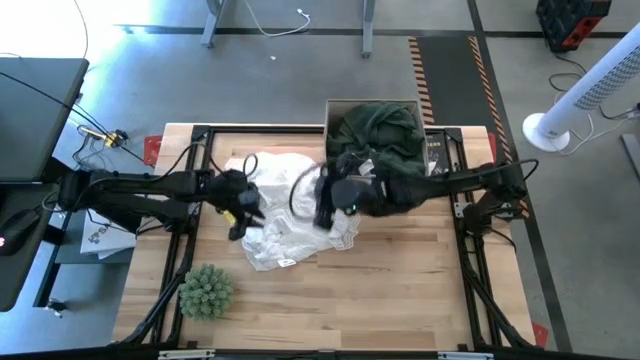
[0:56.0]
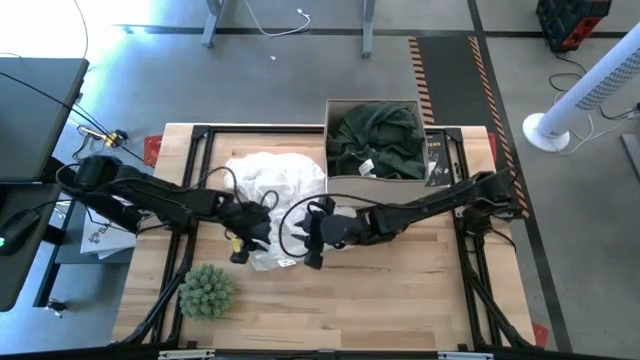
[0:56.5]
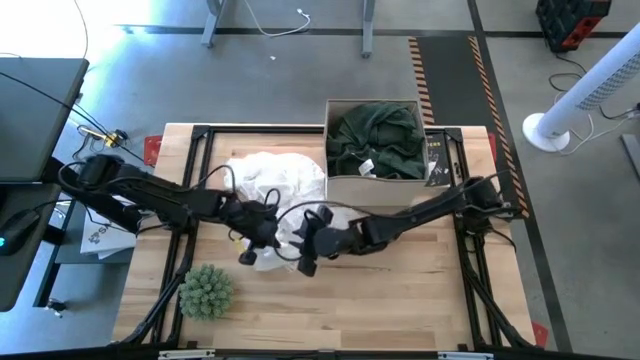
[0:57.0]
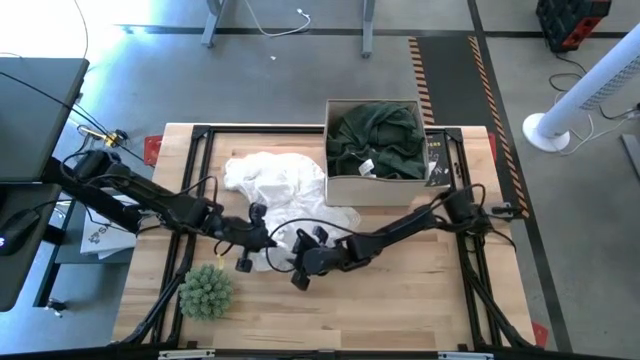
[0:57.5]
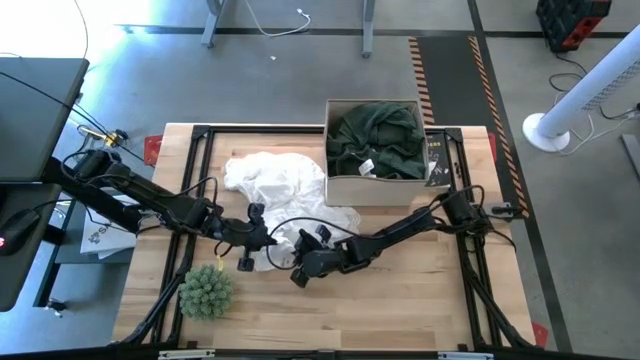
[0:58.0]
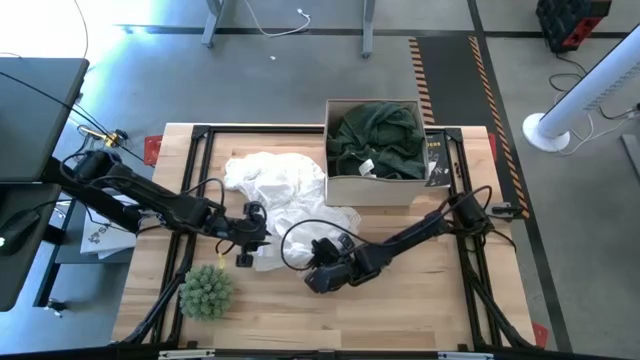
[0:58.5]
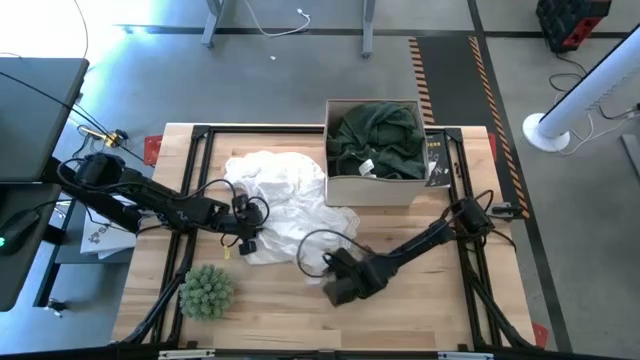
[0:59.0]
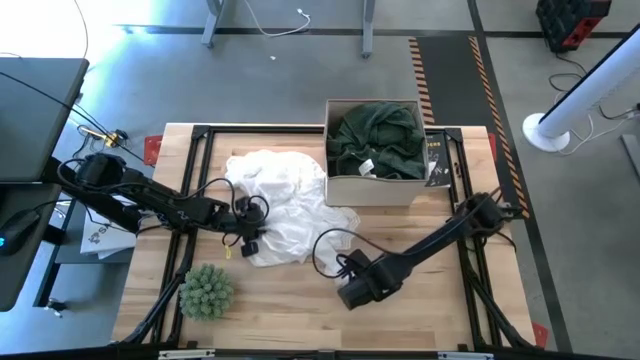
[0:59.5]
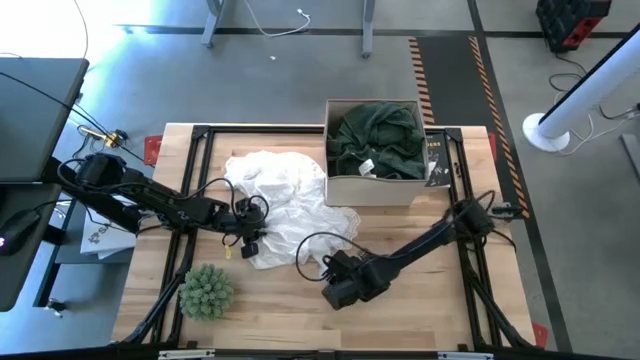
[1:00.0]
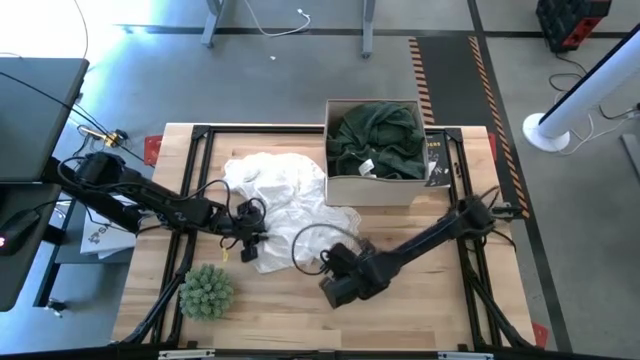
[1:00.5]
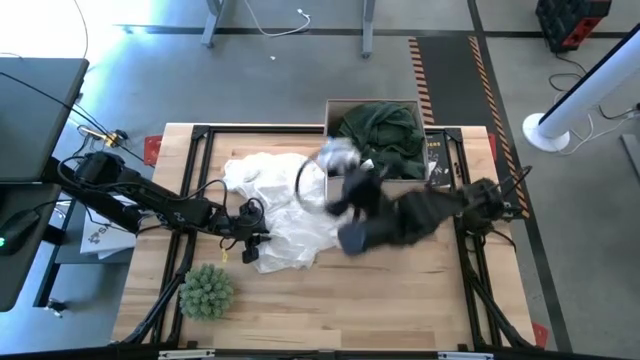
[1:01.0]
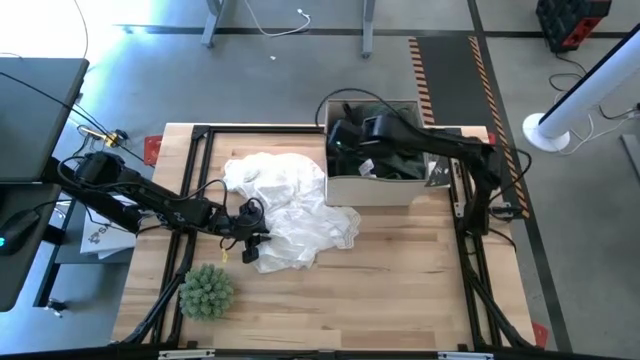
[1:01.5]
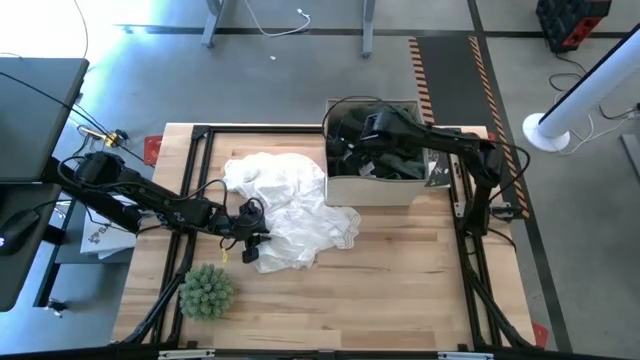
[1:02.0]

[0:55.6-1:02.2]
Task: Sort clothes
Put the white sock into the laundry bin

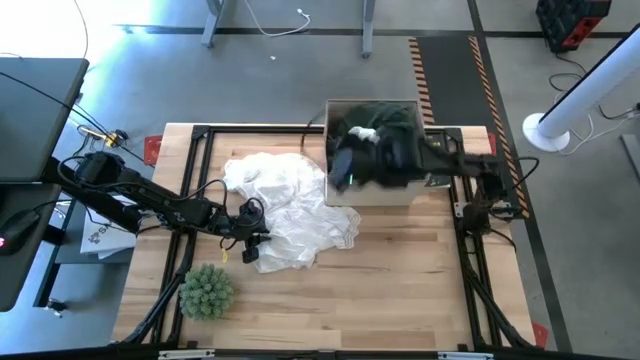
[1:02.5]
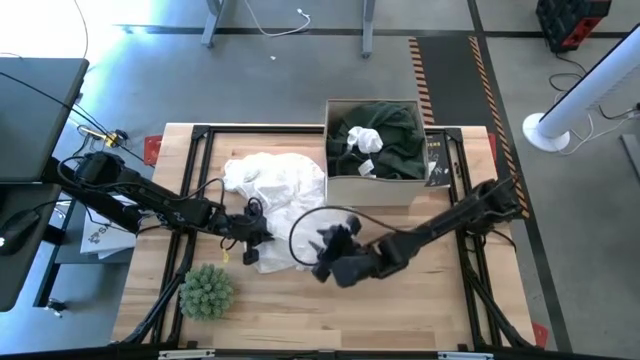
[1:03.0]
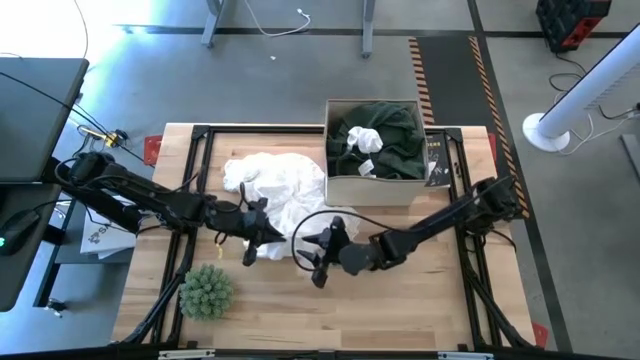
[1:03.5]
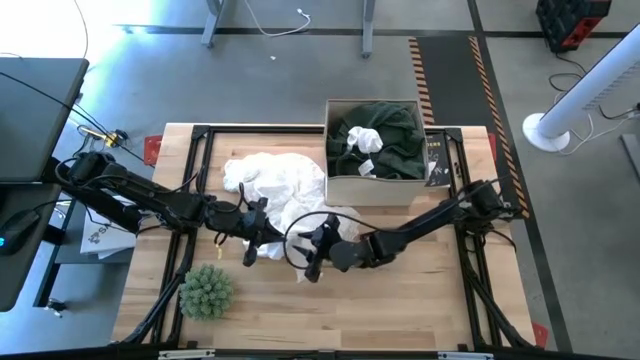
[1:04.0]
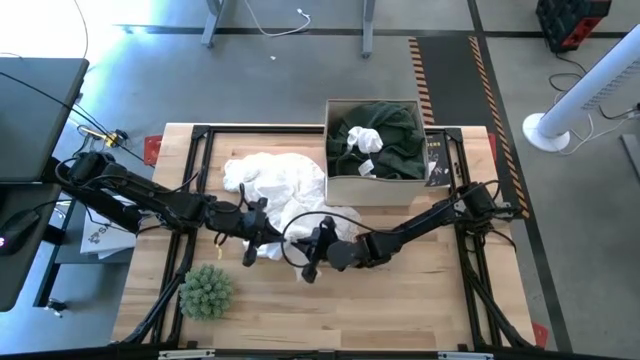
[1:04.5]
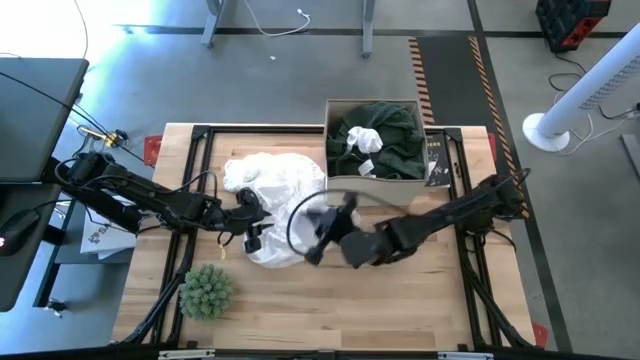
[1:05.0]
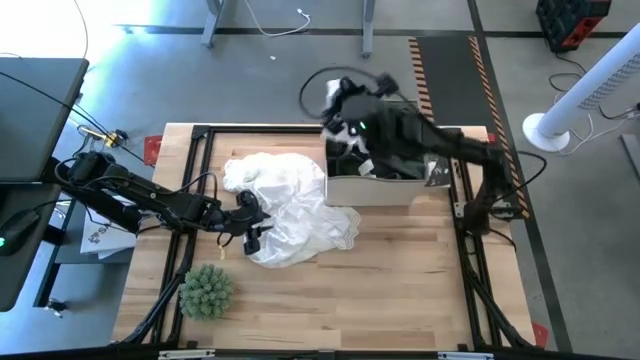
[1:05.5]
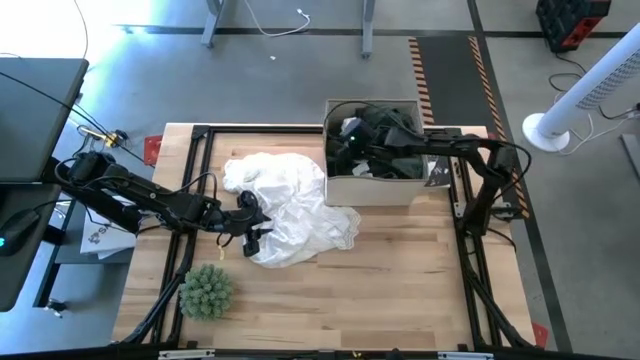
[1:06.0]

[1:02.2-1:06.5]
Put the white sock into the laundry bin

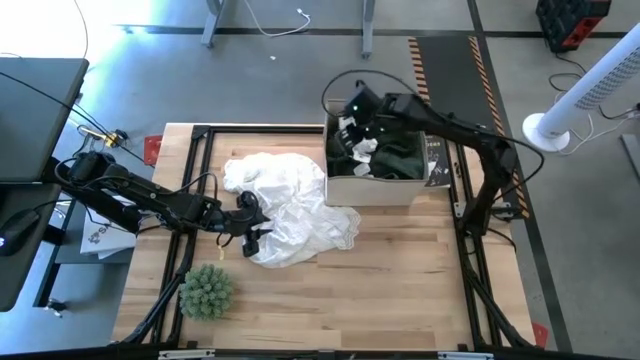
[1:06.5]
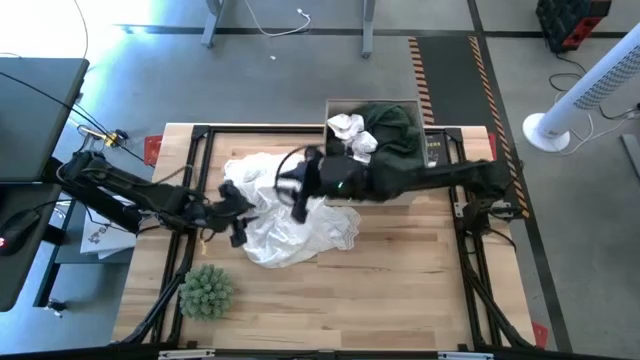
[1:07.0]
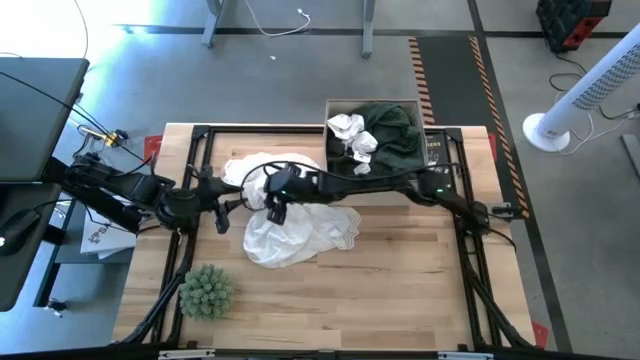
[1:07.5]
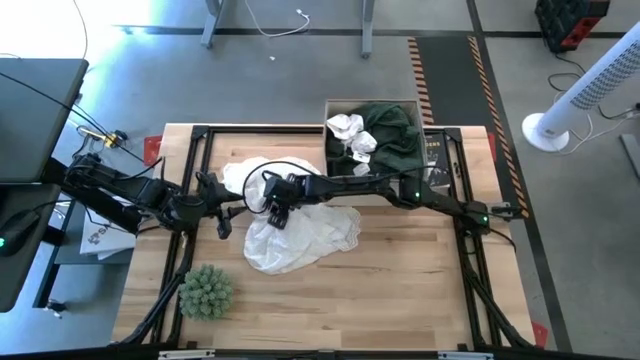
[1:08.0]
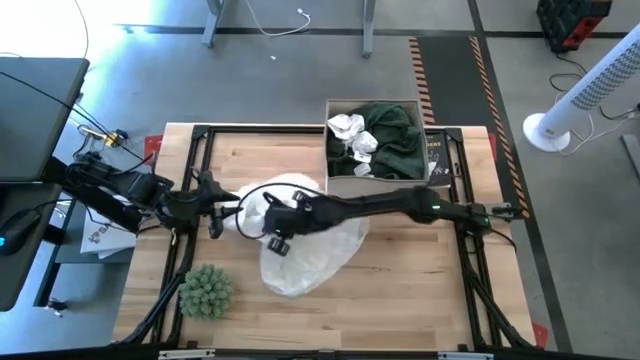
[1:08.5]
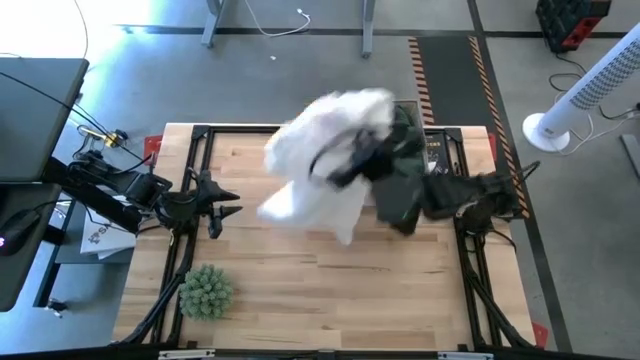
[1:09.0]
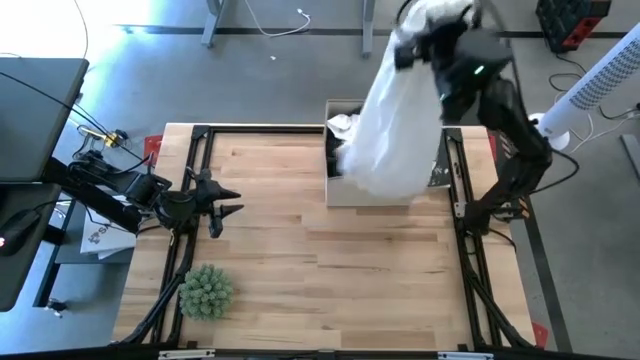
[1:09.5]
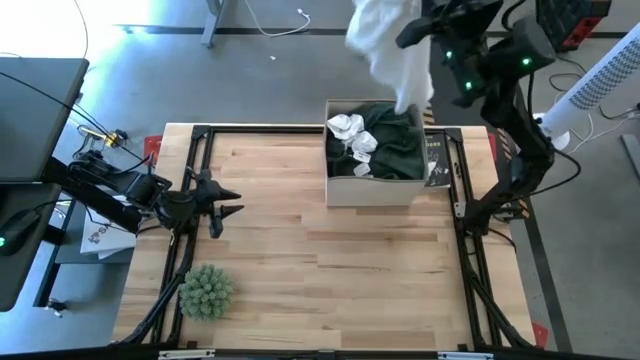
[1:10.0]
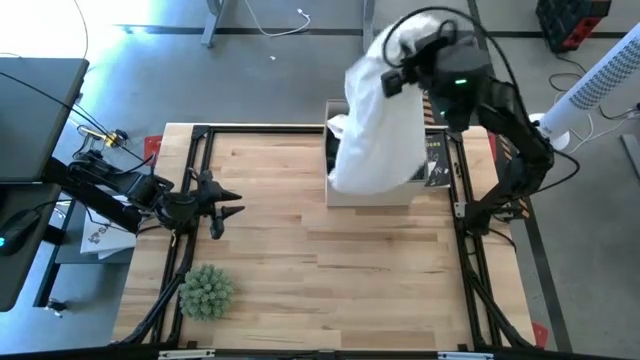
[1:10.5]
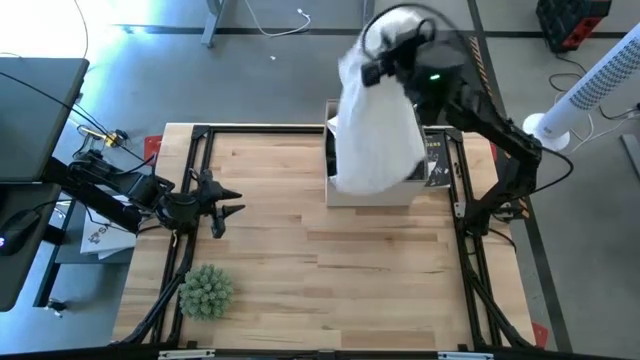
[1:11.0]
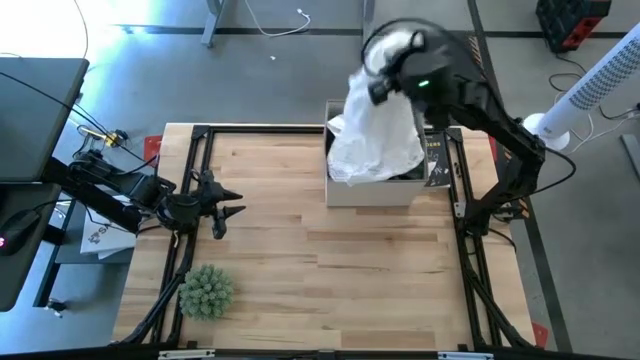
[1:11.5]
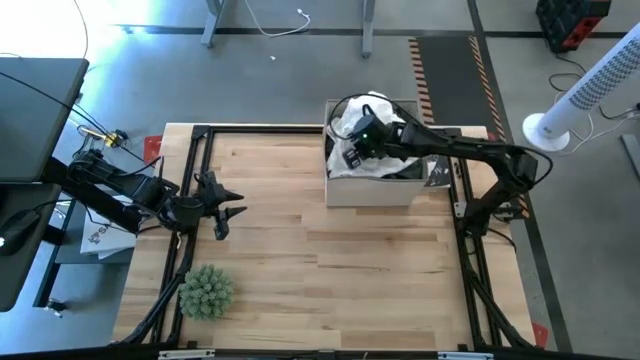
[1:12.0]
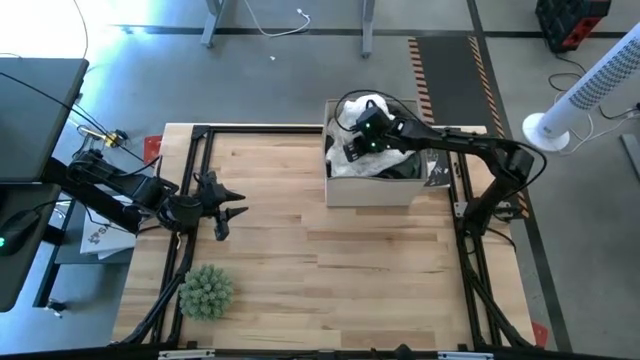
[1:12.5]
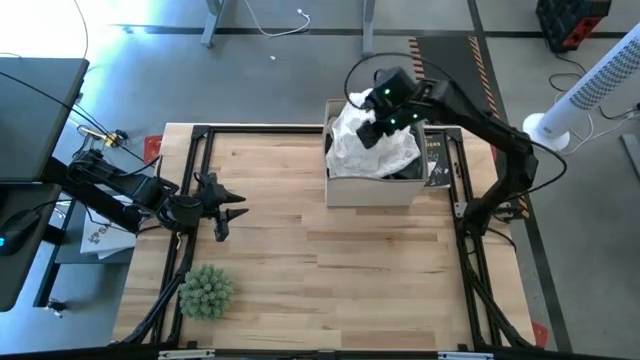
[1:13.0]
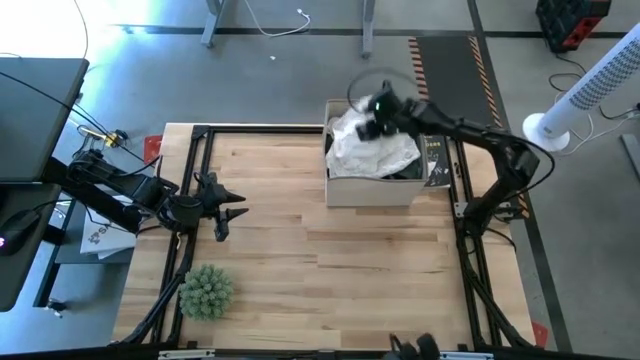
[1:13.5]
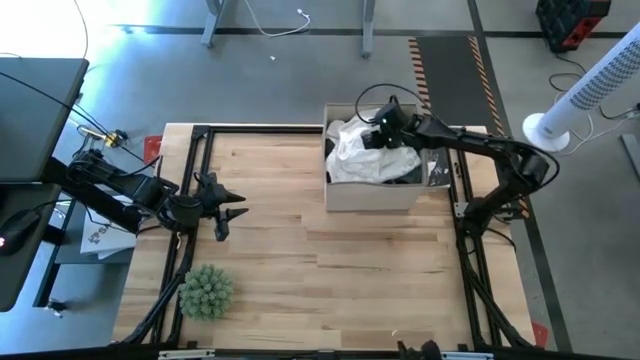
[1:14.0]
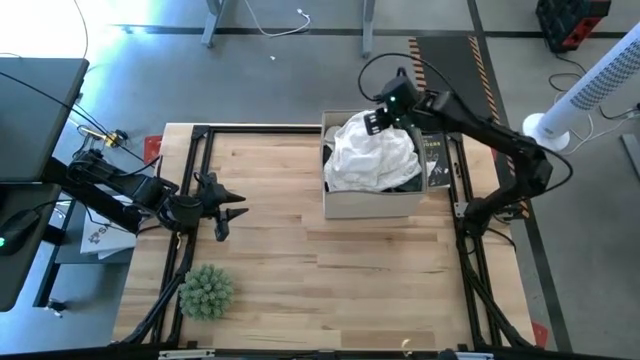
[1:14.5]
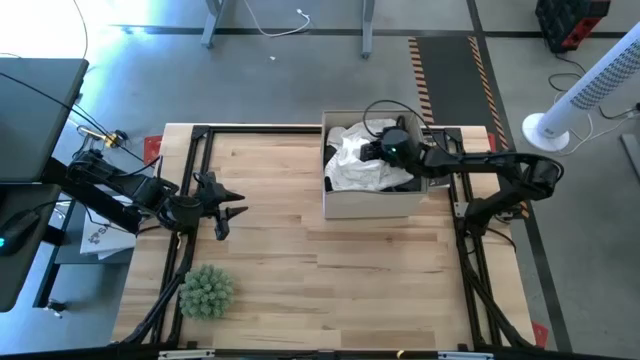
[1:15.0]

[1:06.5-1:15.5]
Put the white dress into the laundry bin

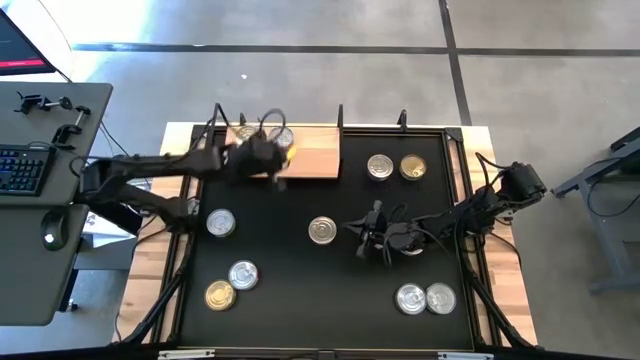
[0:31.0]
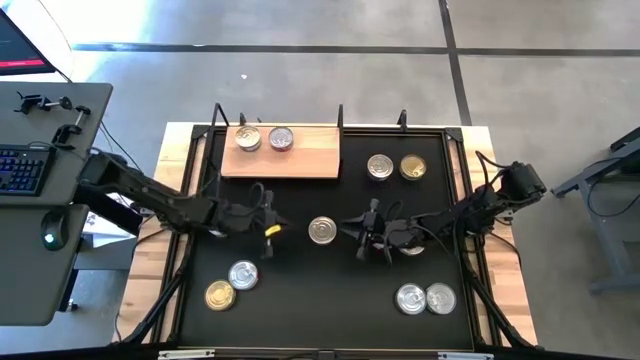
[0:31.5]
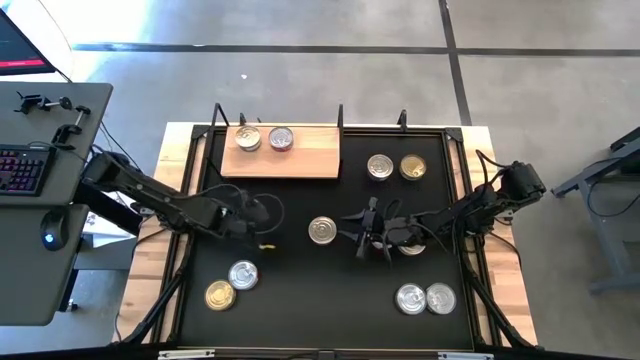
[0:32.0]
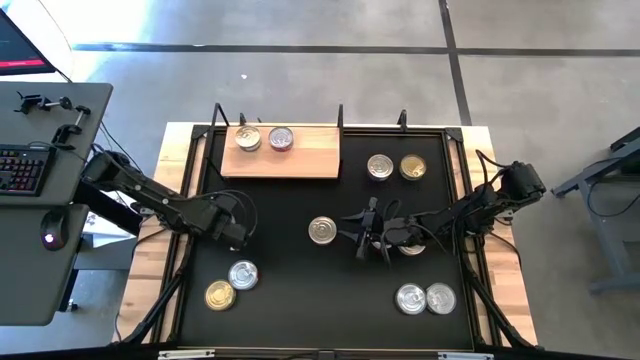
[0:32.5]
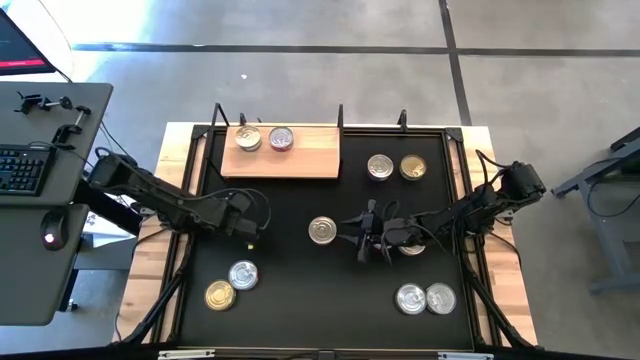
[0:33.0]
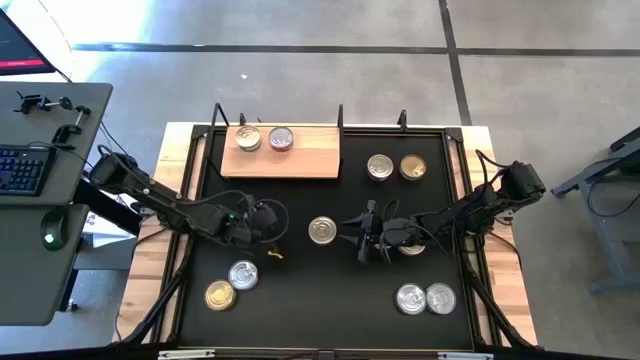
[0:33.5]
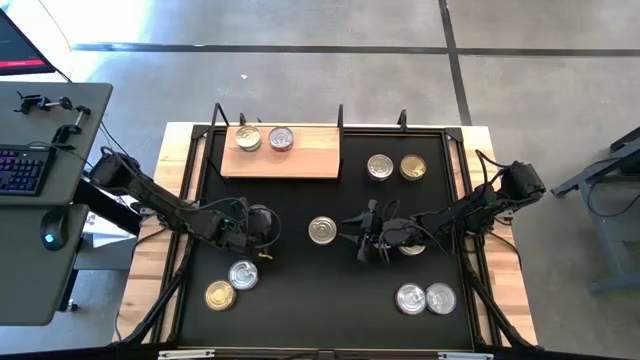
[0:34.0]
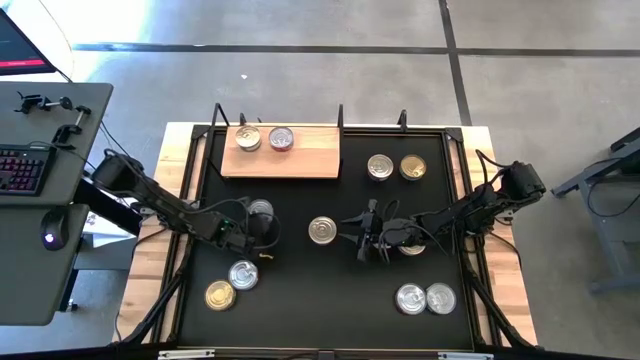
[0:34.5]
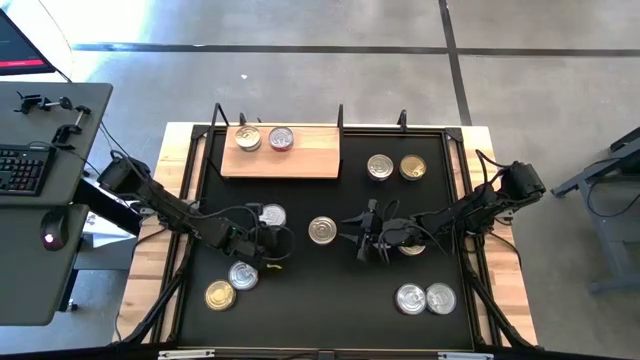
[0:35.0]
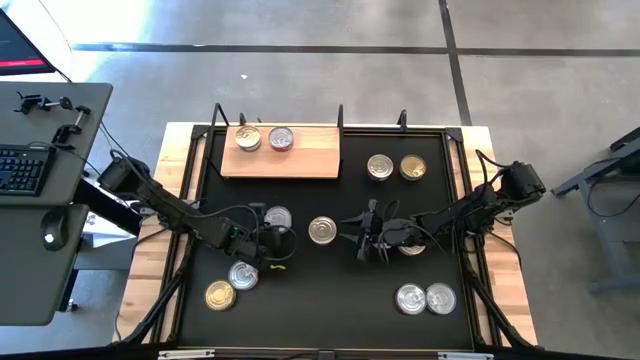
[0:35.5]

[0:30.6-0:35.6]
Task: Stack canned seafood by type on shelf
Put the green tuna can on the shelf
